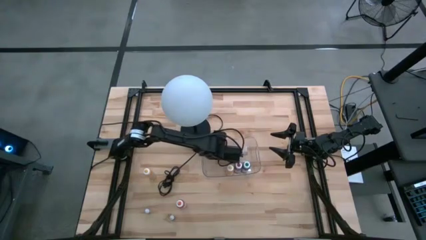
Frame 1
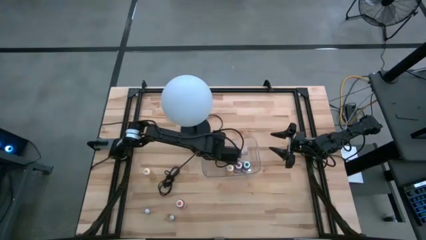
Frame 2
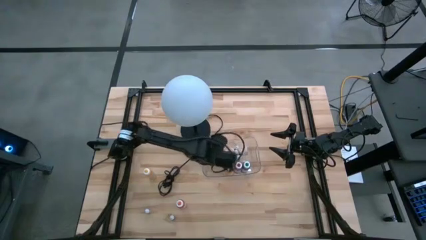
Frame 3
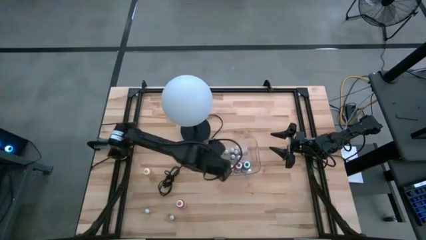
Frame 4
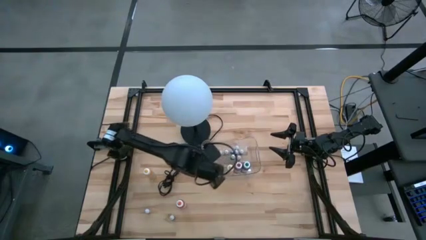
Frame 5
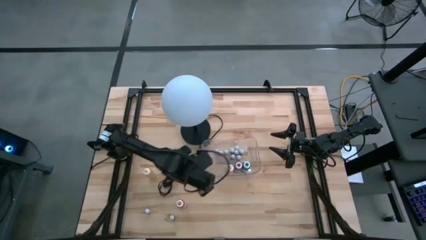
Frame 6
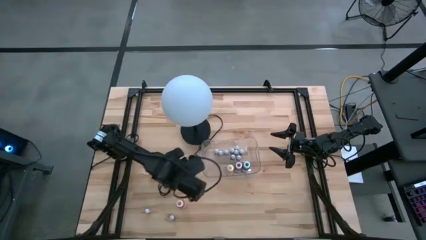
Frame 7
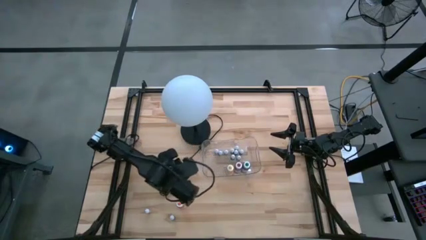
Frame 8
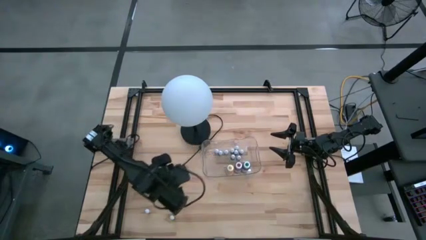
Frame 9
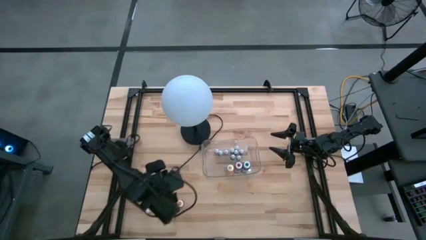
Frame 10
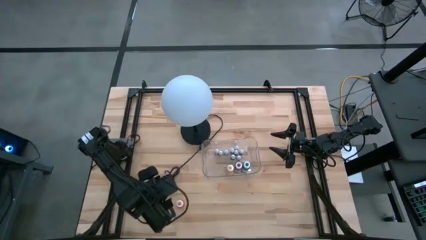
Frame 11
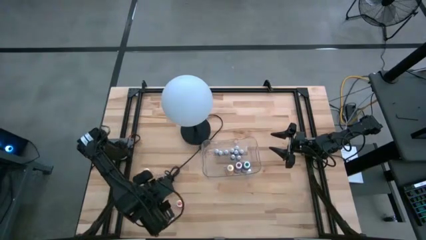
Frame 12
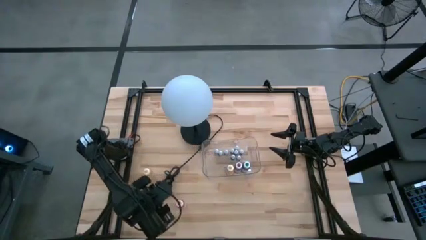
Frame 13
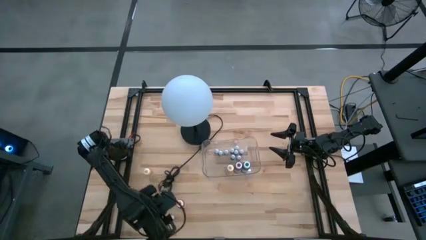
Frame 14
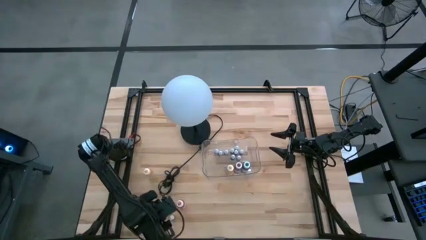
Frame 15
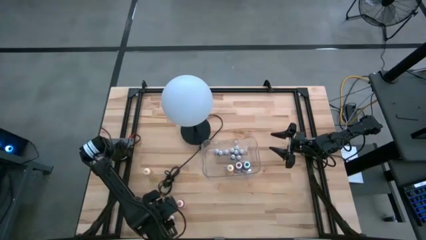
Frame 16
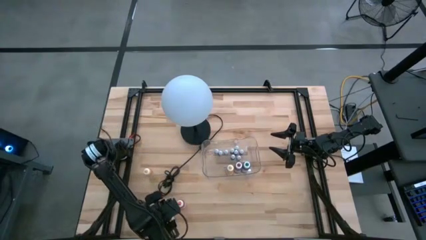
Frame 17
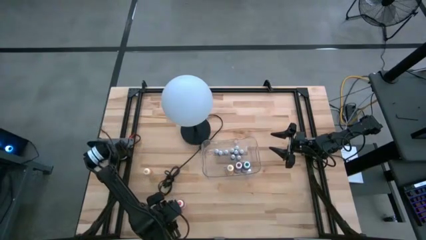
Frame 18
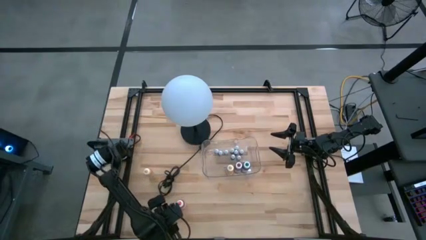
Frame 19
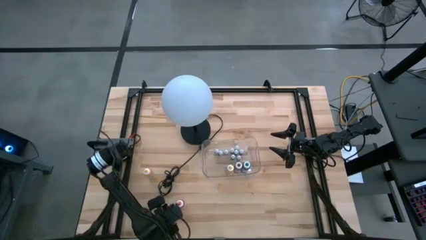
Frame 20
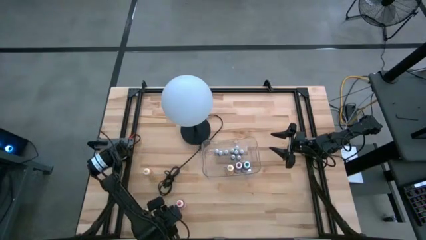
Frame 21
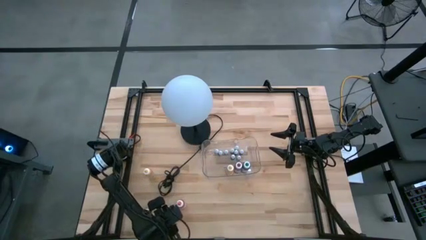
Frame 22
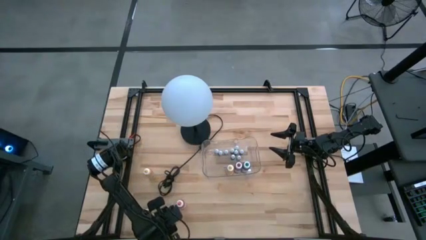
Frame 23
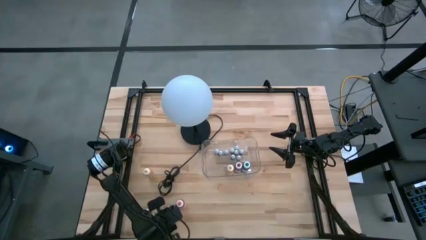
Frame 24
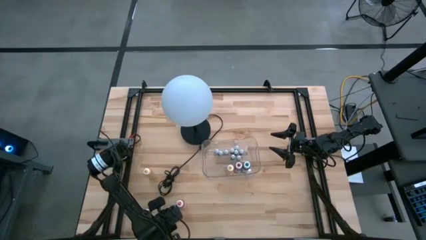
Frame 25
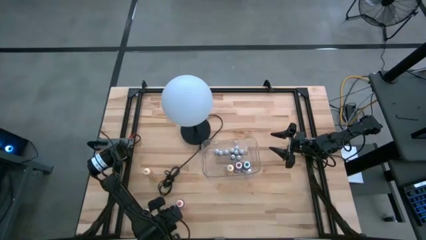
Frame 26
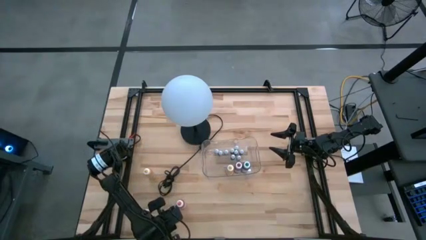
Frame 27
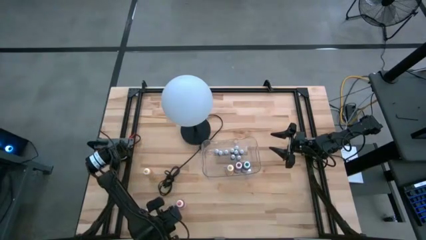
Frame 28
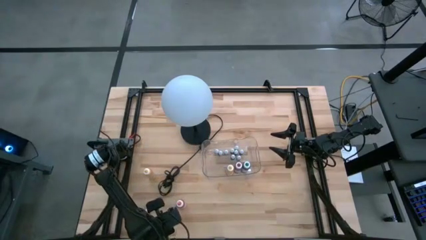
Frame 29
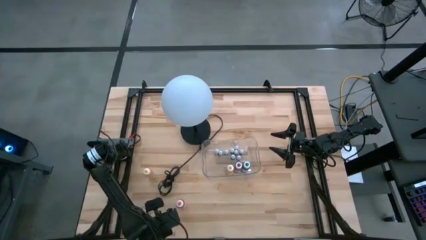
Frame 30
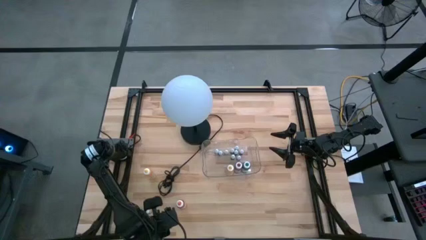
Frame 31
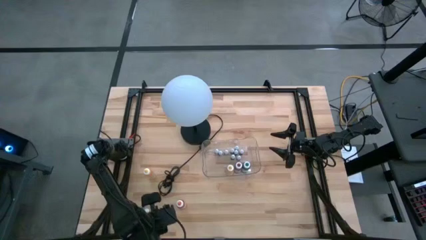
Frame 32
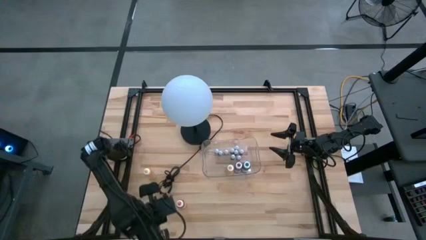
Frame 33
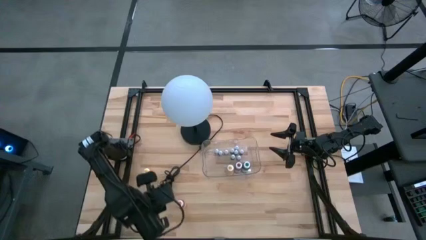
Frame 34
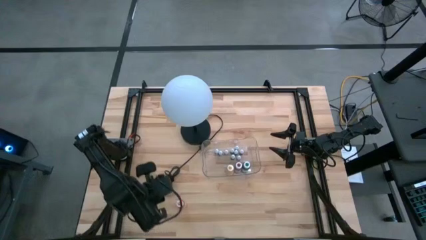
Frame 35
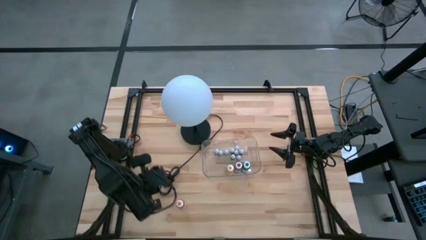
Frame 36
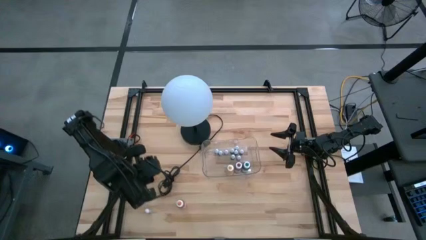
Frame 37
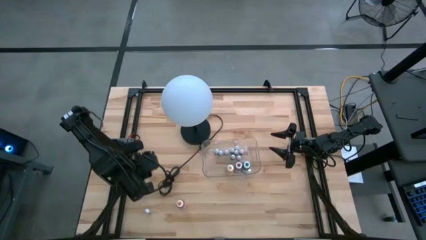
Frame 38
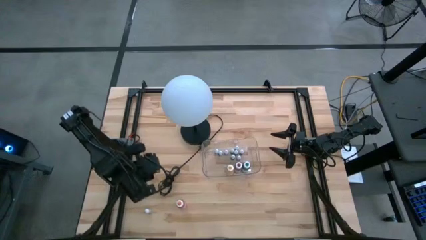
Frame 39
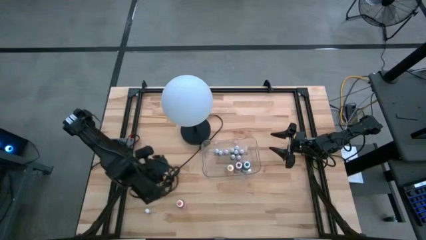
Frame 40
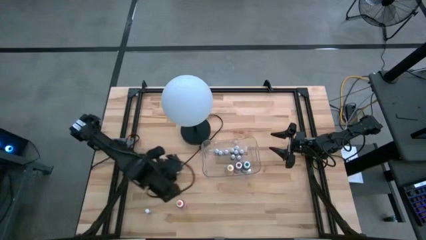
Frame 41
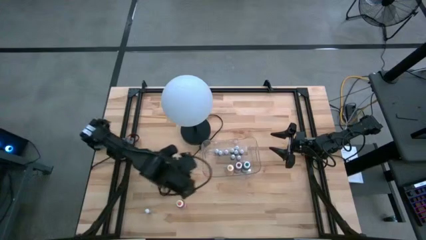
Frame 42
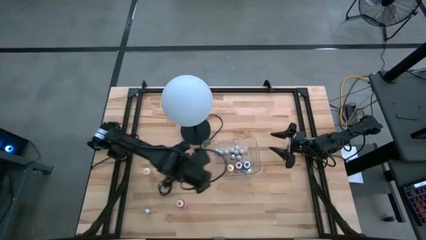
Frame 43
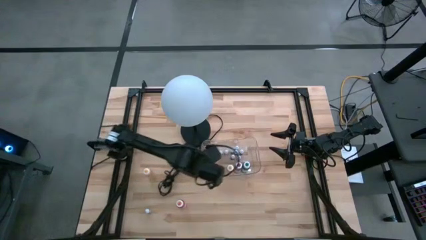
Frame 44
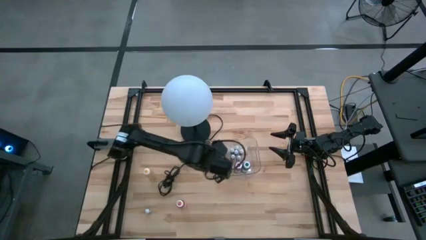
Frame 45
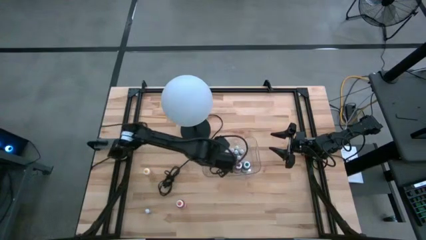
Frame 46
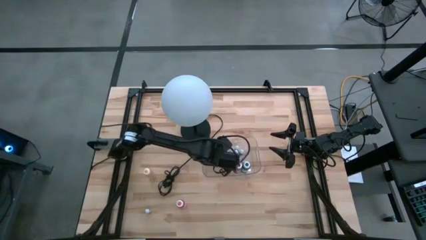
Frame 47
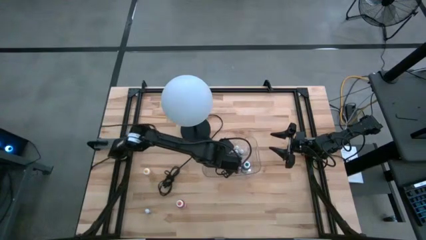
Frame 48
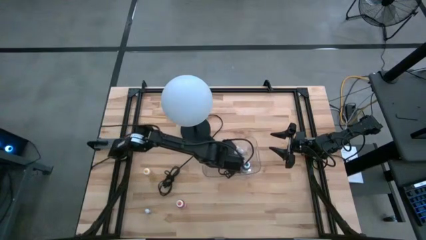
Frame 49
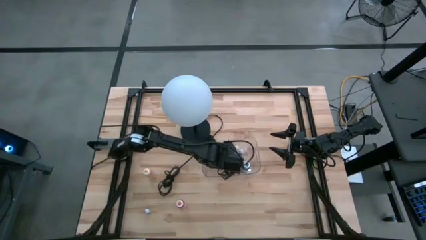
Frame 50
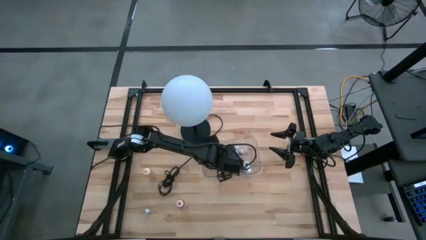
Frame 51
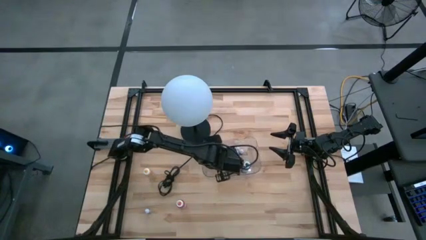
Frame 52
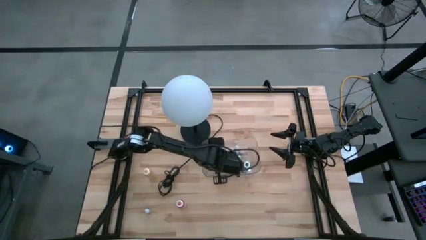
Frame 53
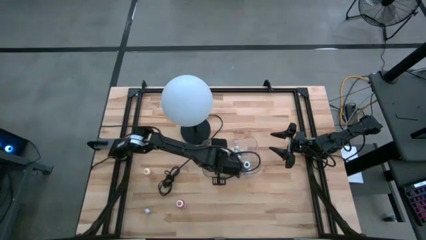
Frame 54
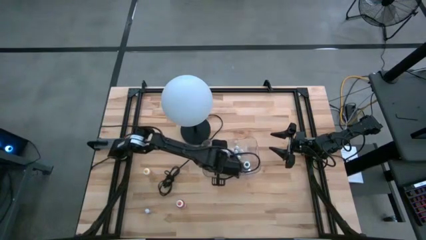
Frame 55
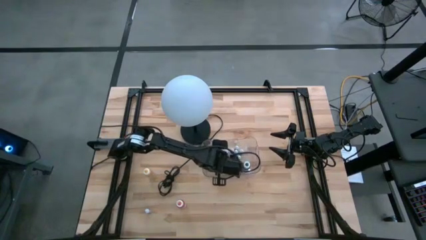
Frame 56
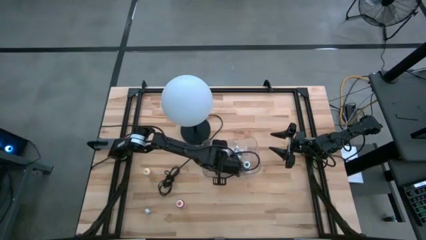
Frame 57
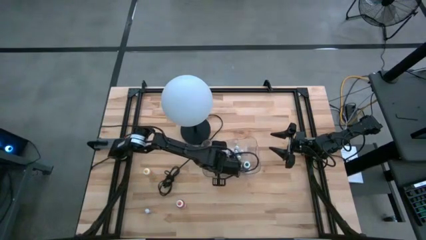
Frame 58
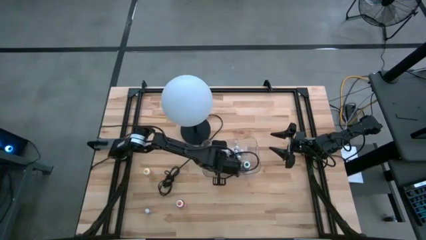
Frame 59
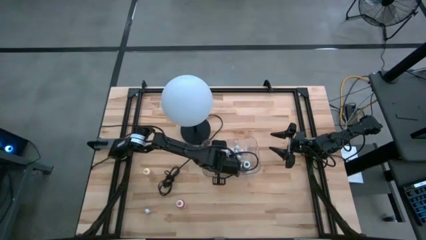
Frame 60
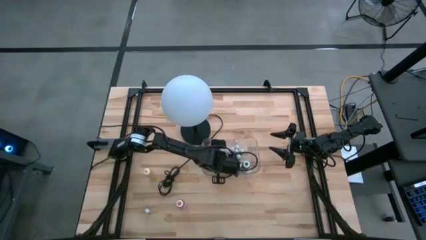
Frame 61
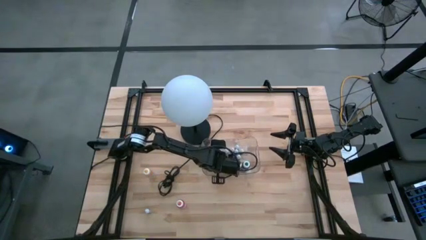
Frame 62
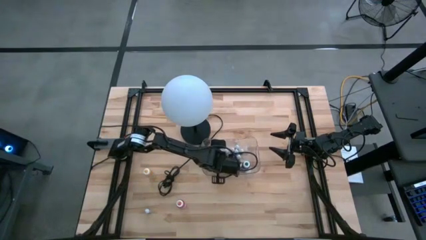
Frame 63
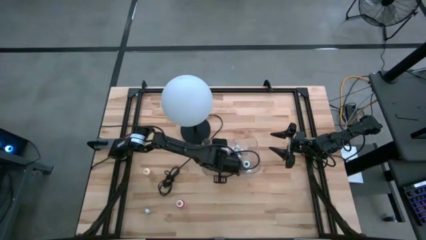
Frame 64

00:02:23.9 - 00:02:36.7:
Task: Pick & Place food coloring
Put the small green food coloring bottle into the transparent bin
